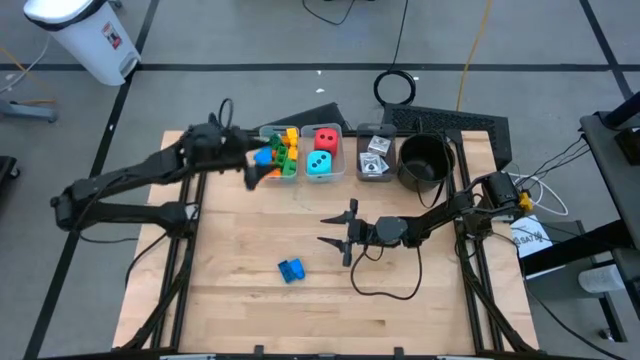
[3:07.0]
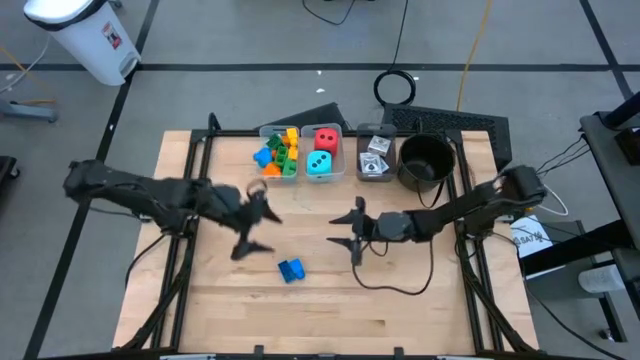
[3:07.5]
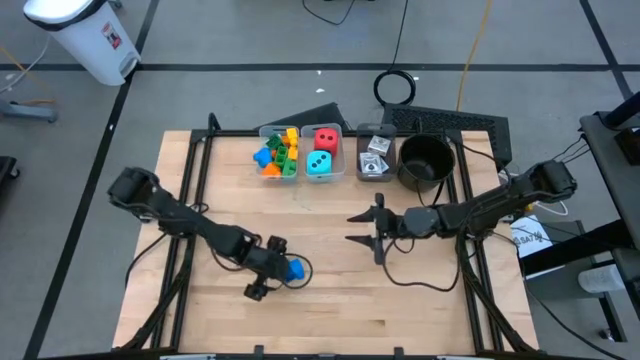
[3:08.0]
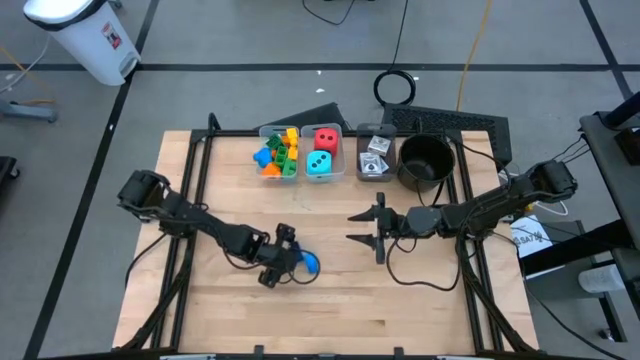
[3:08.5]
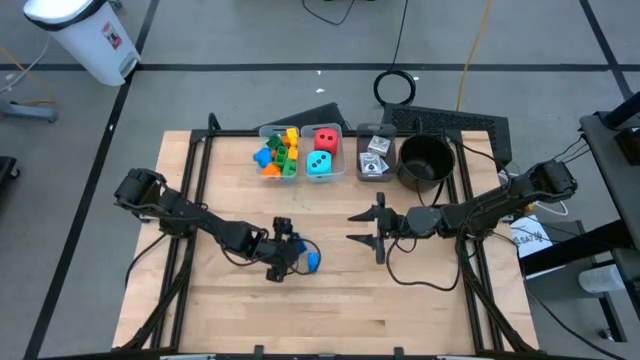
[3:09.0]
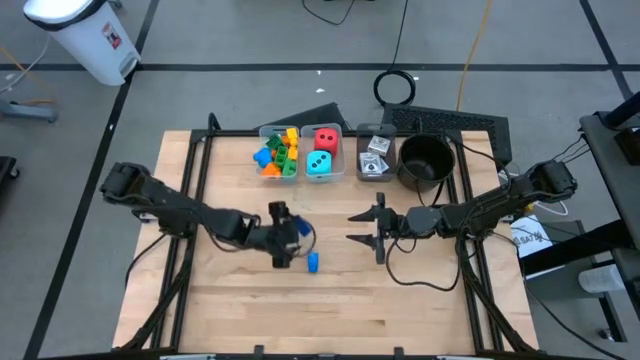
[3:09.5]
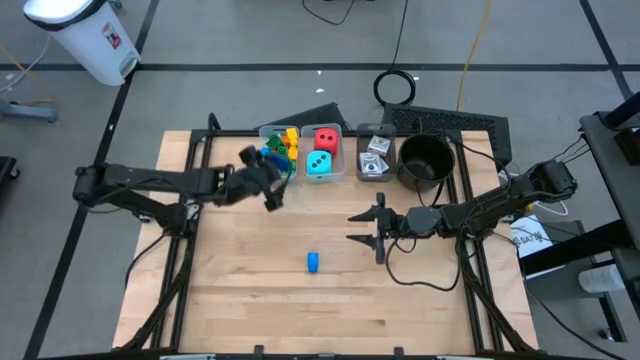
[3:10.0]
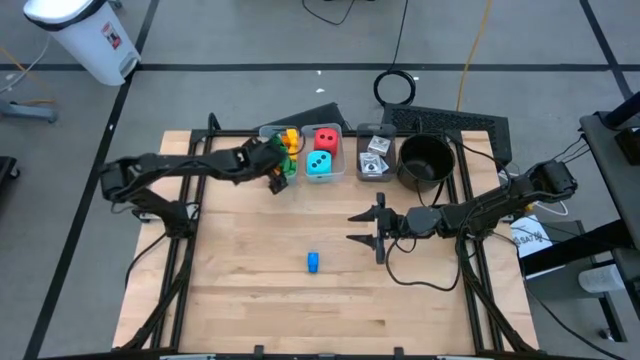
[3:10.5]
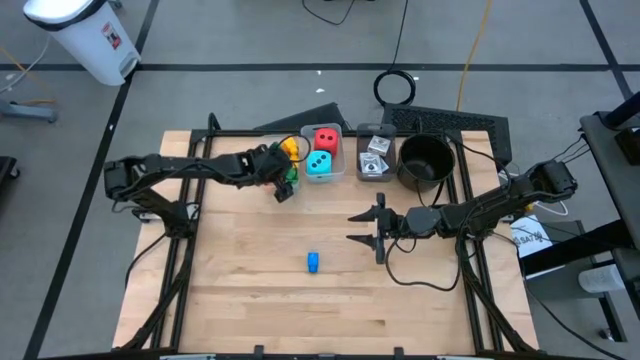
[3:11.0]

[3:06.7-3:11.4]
Task: Pick & Place Toys
Put the blue game piece into the left transparent bin

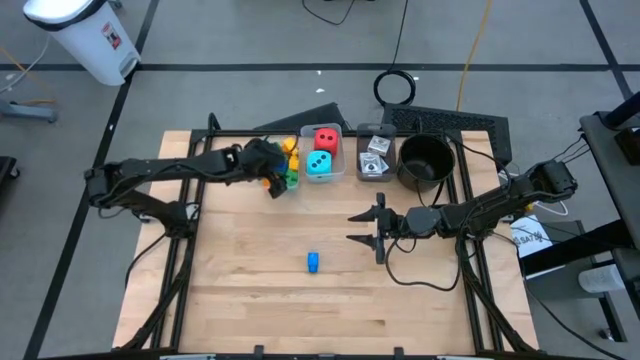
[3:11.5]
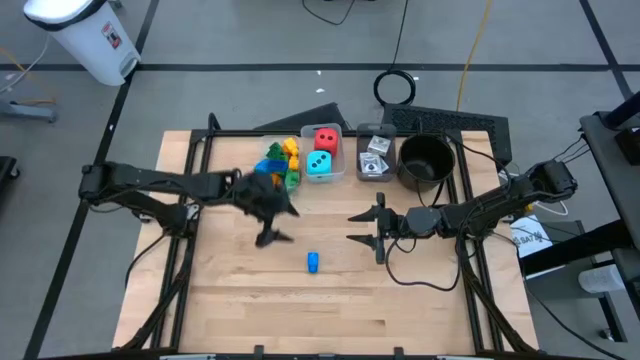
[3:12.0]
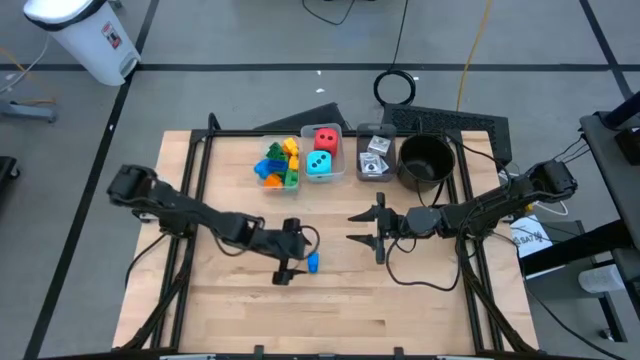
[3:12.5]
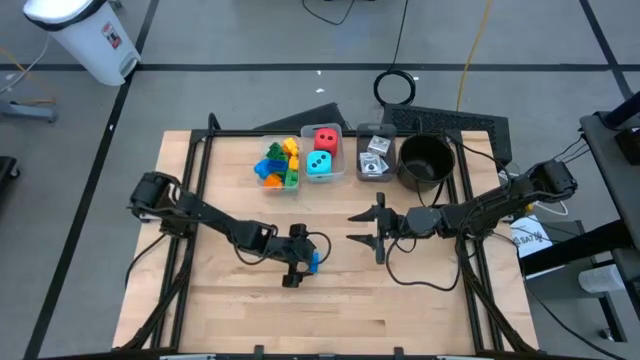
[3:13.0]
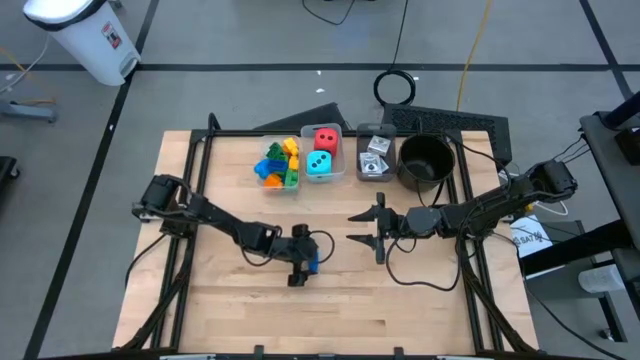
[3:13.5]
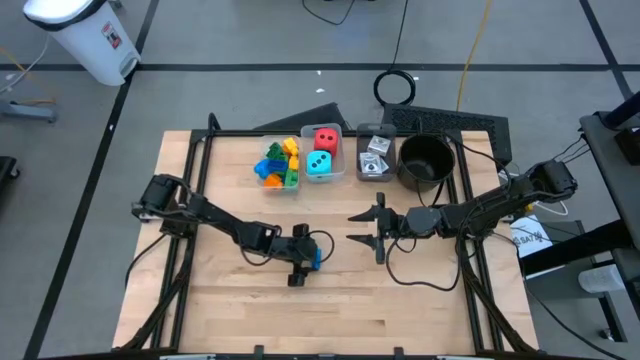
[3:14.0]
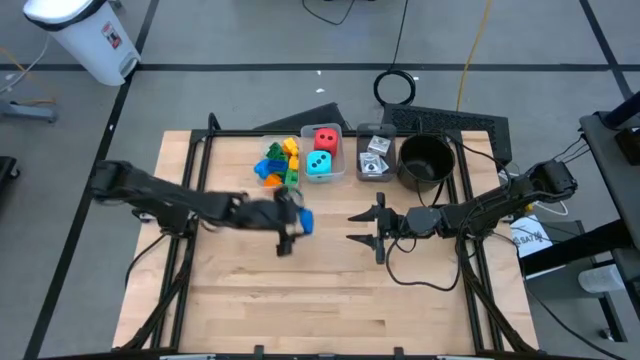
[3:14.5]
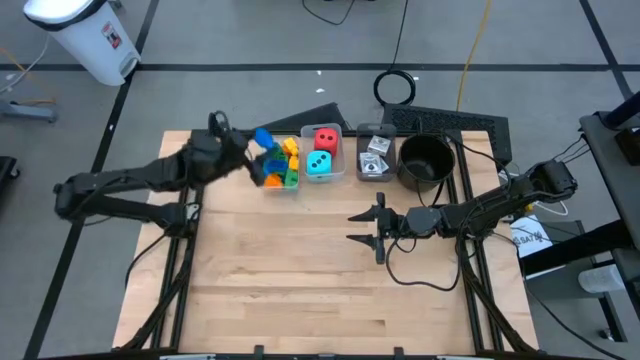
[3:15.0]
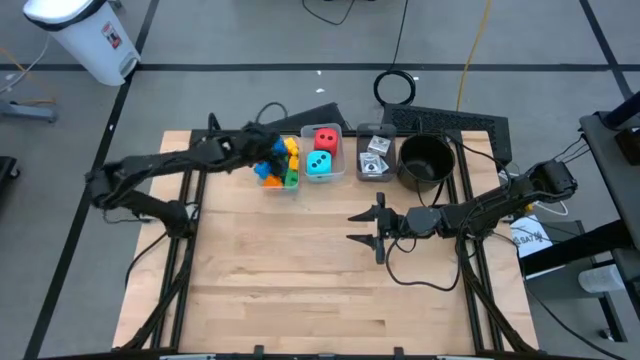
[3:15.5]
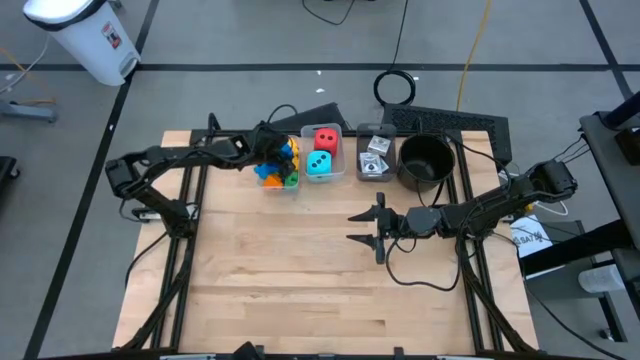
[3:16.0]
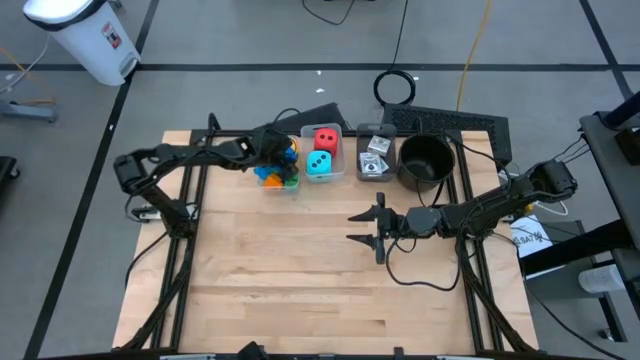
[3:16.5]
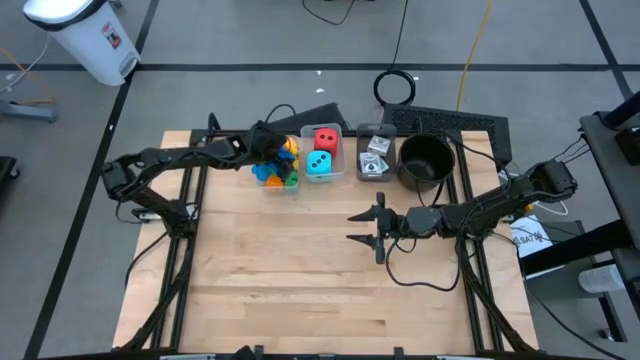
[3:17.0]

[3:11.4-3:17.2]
Put the dark blue game piece into the left transparent bin

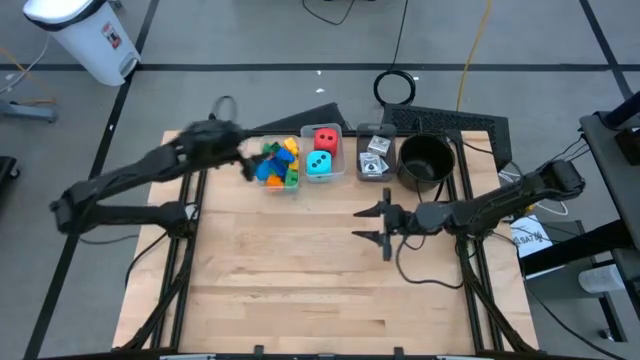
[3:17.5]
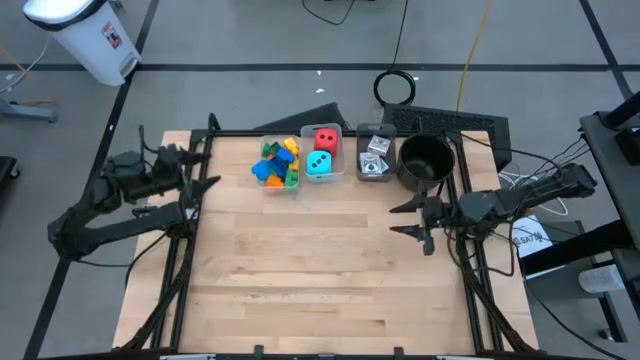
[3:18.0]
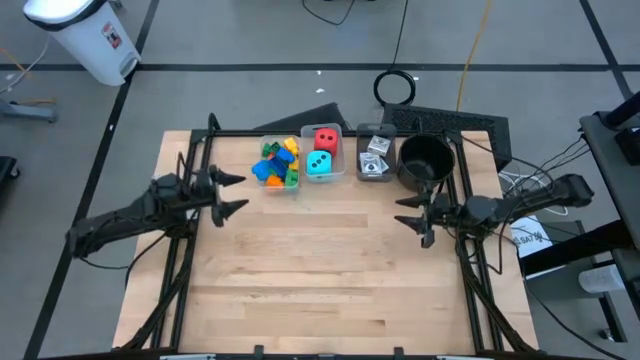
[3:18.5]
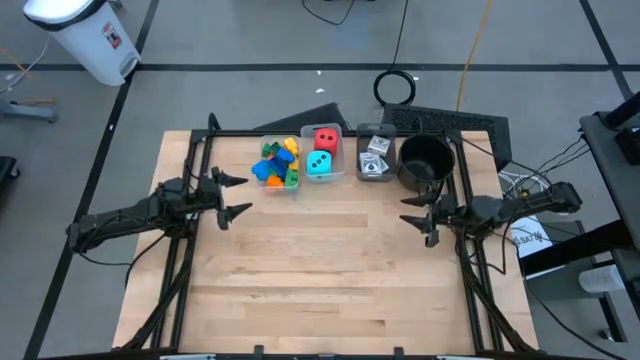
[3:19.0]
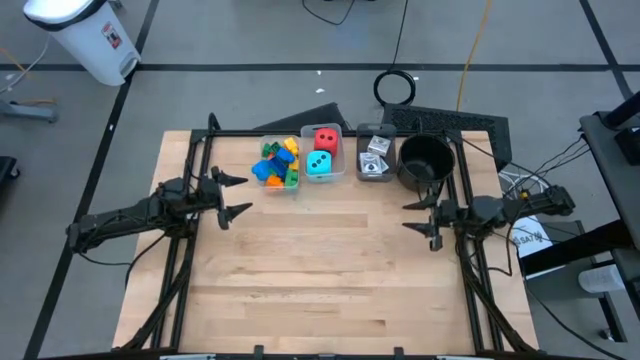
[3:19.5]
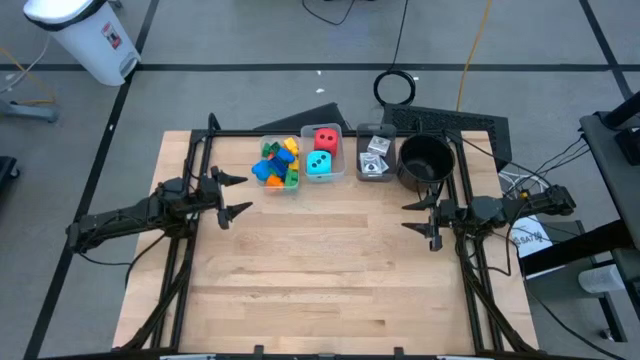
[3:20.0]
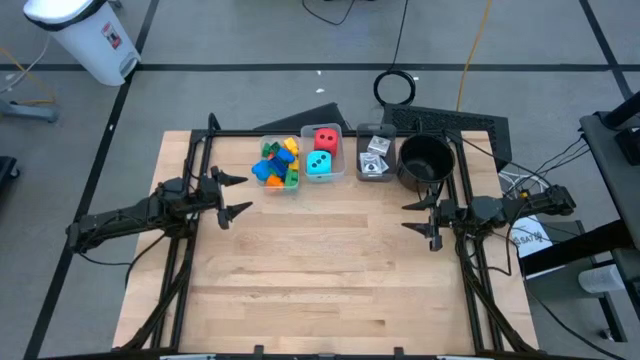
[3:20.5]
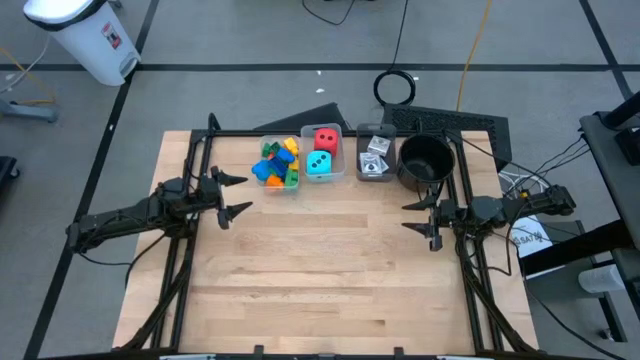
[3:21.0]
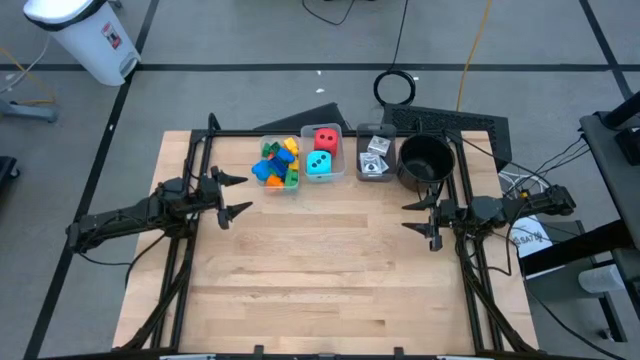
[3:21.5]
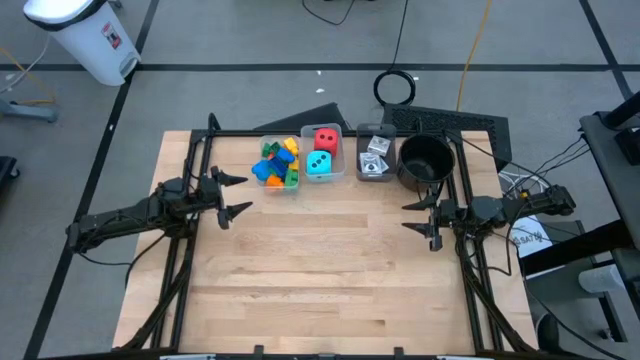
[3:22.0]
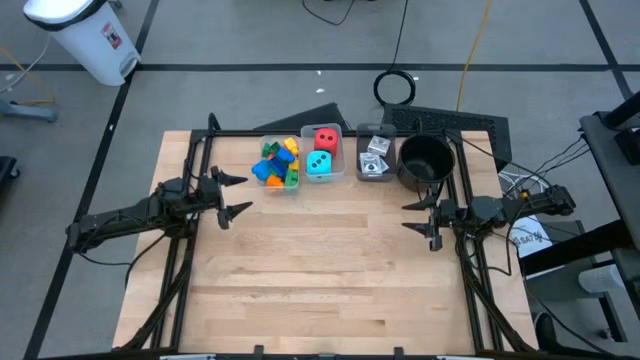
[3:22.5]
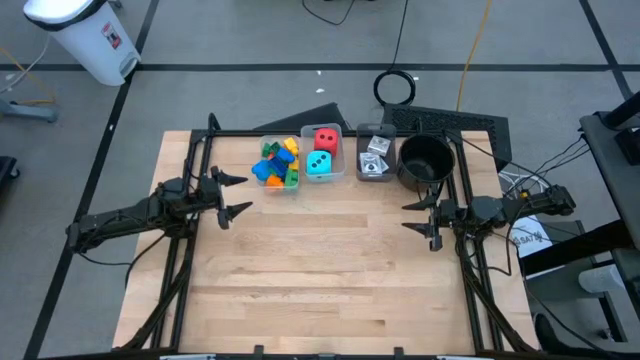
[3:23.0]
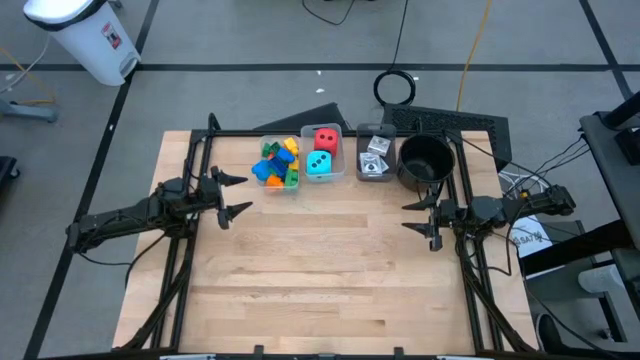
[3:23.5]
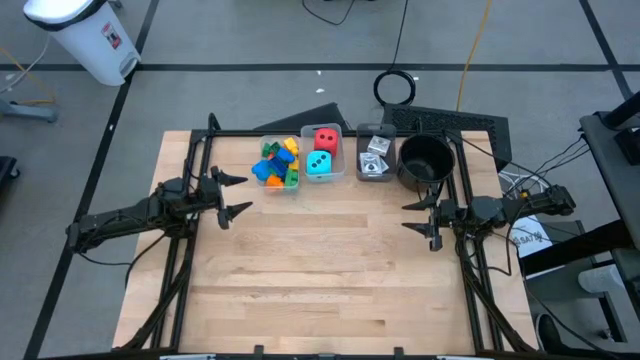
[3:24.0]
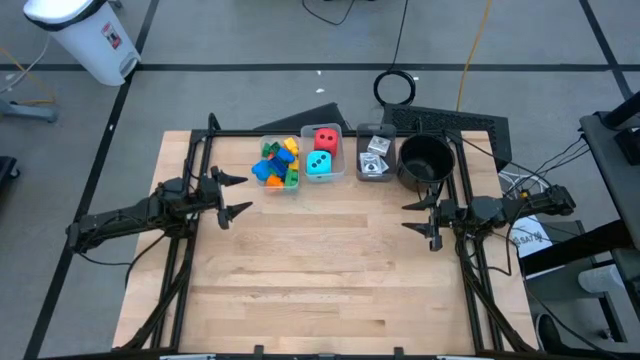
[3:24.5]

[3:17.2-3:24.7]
Return to Home Position
